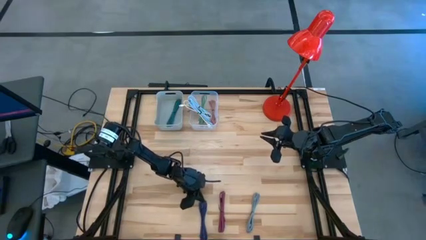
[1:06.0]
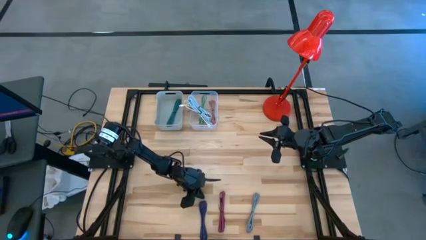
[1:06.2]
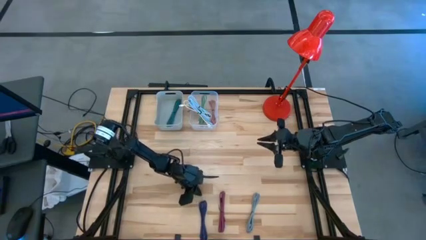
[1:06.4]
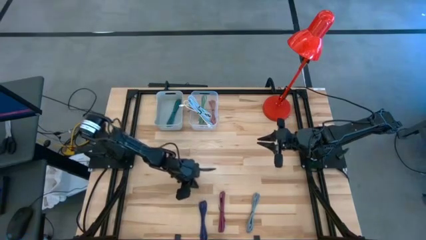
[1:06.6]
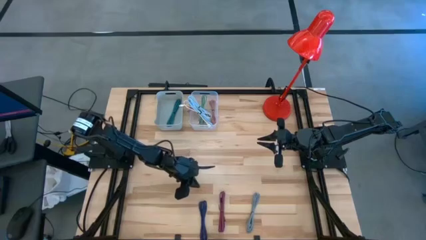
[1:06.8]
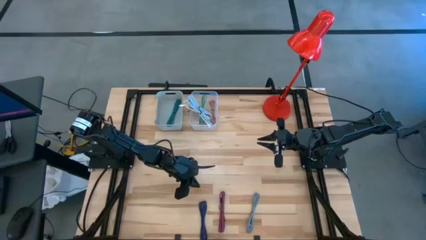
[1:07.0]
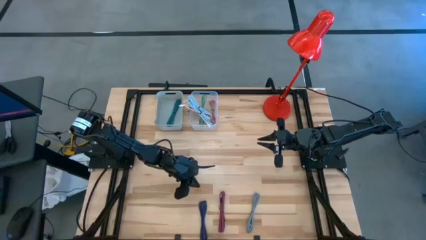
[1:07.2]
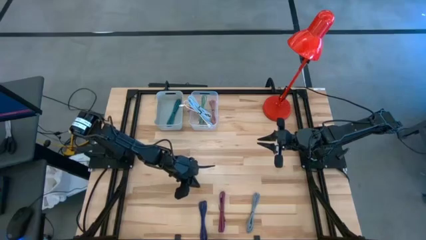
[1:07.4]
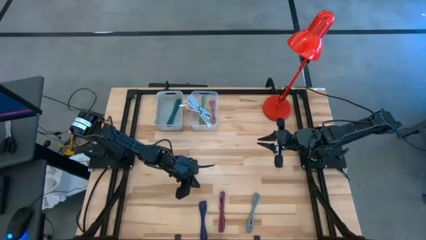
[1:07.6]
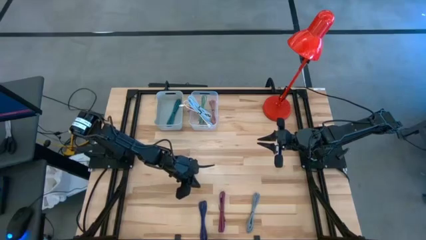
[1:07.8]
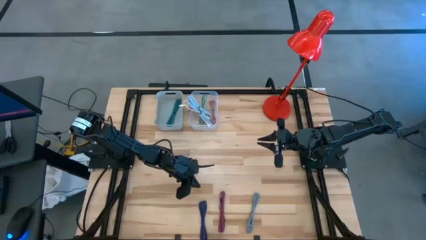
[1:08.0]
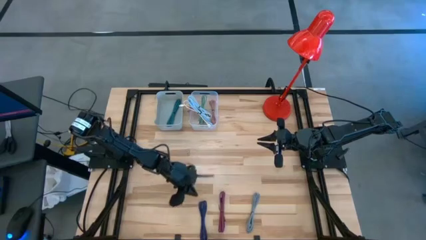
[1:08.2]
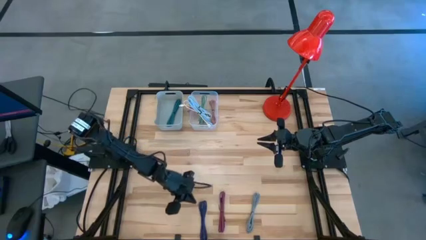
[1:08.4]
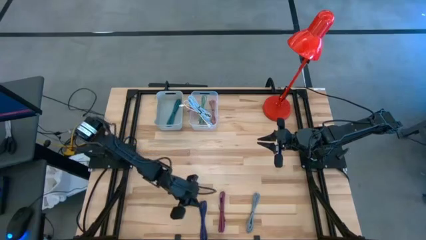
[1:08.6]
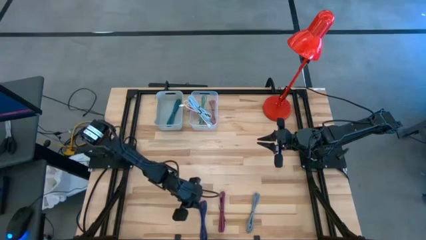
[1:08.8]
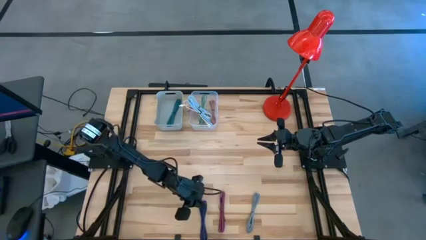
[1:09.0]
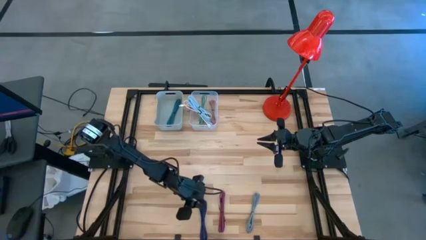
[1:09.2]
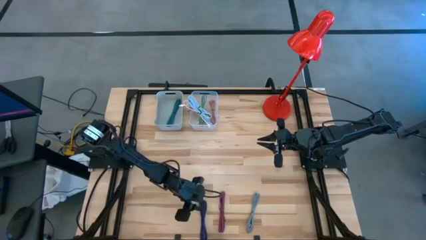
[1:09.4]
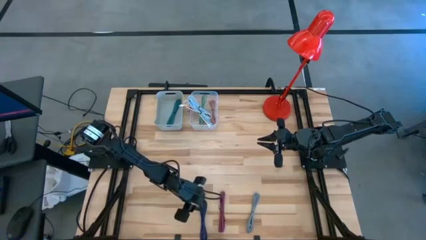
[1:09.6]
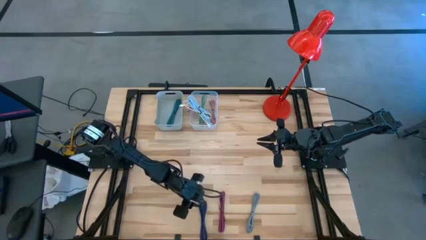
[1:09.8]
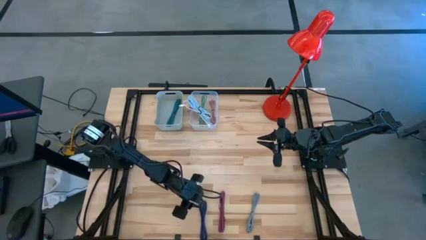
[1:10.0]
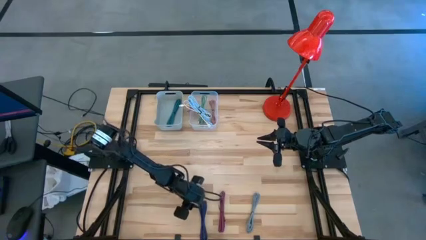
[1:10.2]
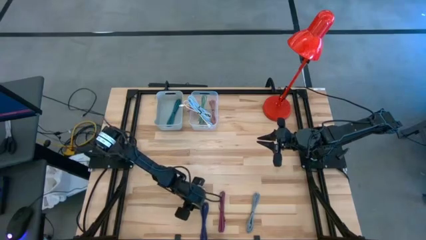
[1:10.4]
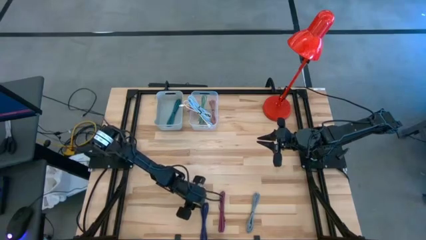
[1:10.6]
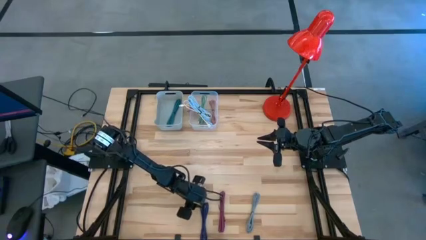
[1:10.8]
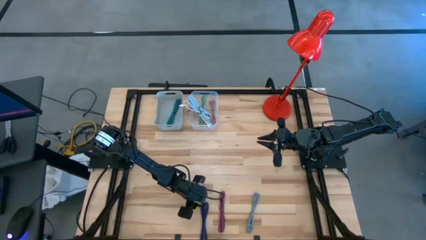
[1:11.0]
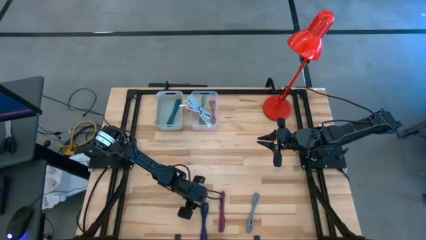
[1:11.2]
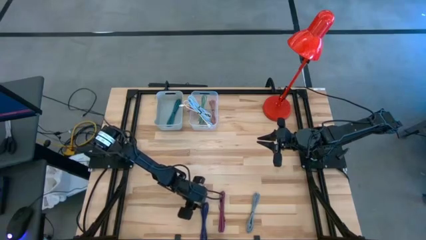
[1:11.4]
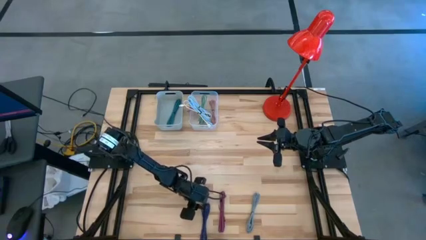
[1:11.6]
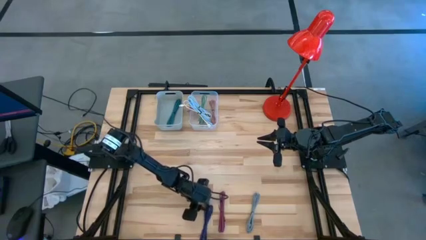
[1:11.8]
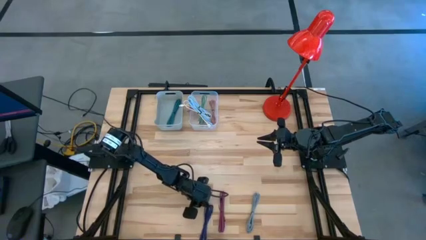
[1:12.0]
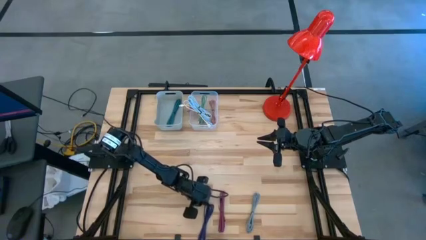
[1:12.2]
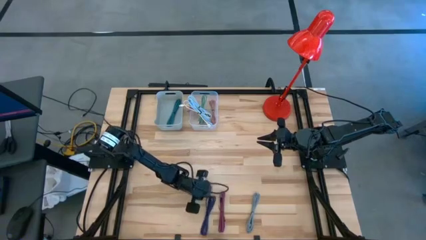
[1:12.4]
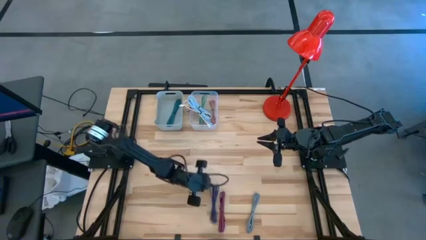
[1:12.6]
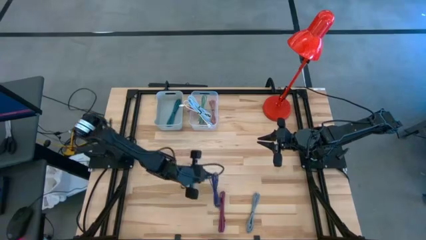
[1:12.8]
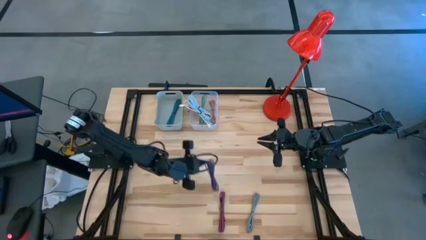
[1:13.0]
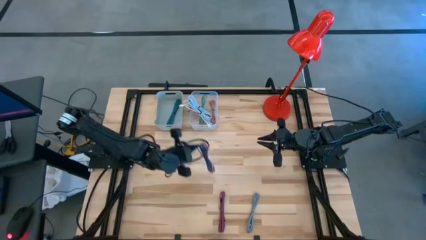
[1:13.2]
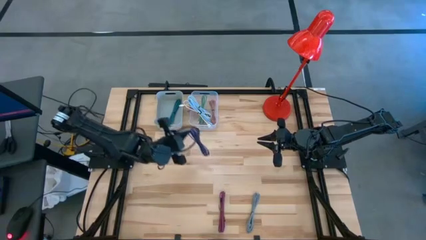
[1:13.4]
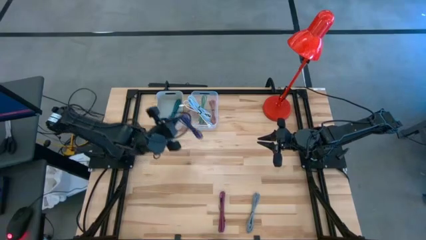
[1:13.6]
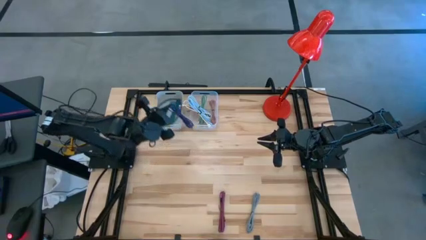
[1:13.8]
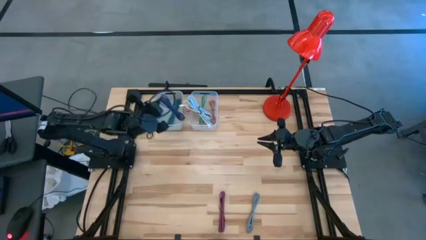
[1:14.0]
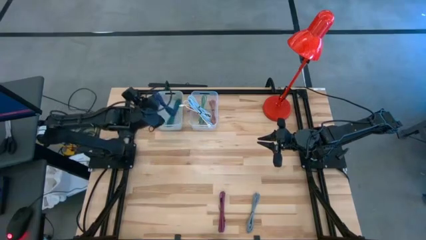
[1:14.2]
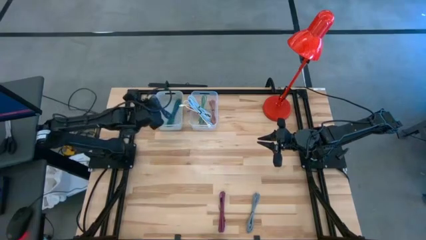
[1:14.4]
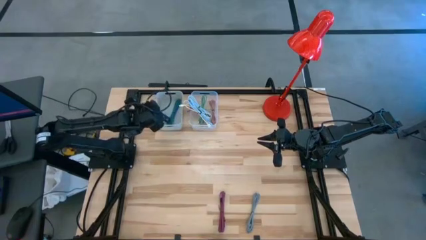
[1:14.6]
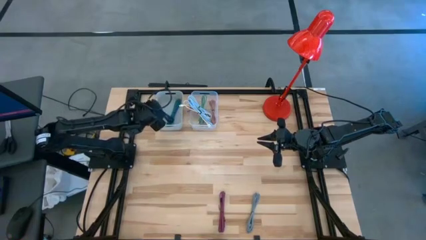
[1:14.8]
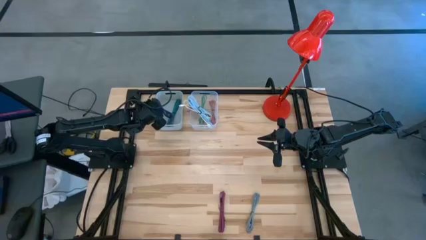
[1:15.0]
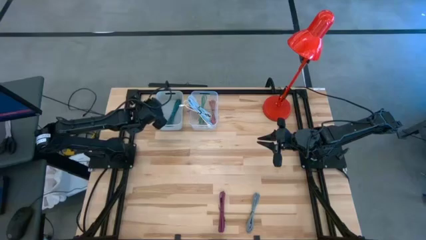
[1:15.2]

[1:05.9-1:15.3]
Task: Pick & Place USB Port
Put the black and violet charge cable into the gray bin

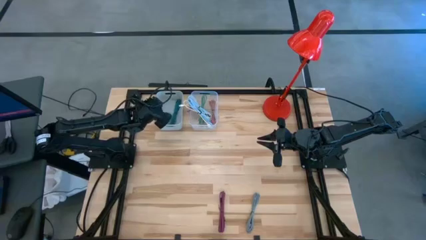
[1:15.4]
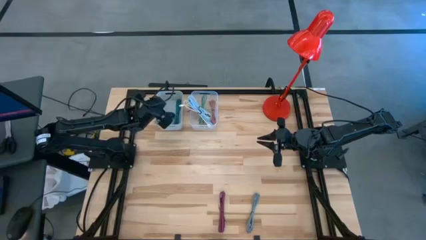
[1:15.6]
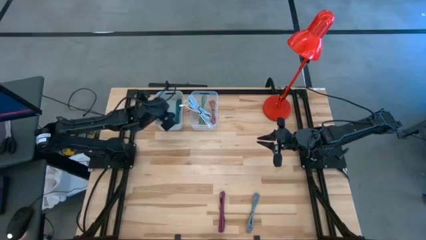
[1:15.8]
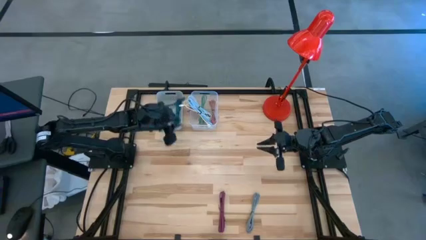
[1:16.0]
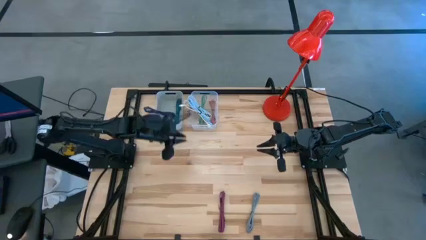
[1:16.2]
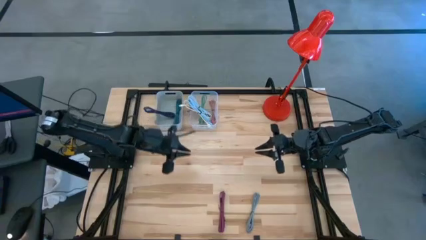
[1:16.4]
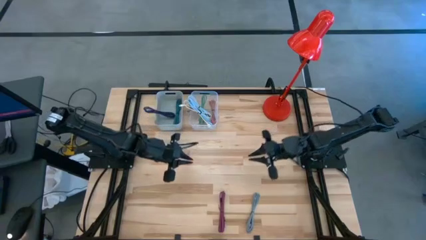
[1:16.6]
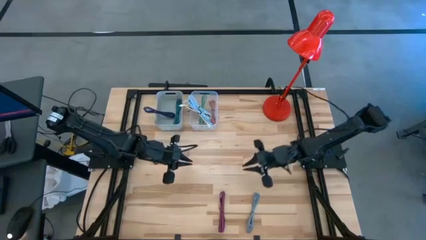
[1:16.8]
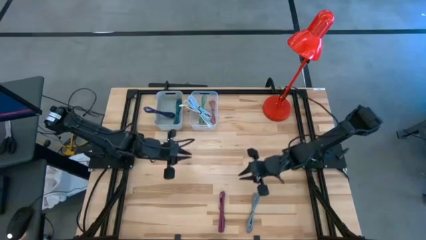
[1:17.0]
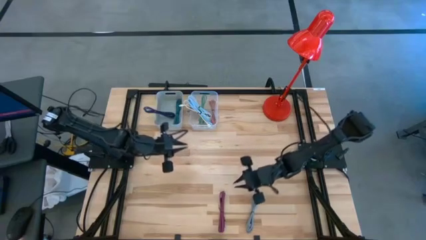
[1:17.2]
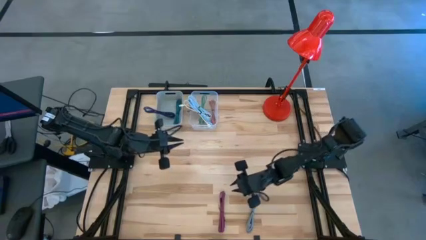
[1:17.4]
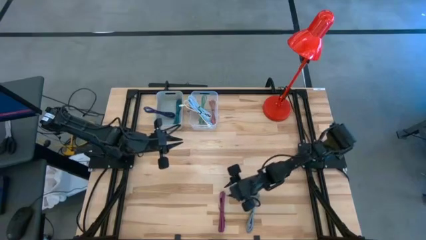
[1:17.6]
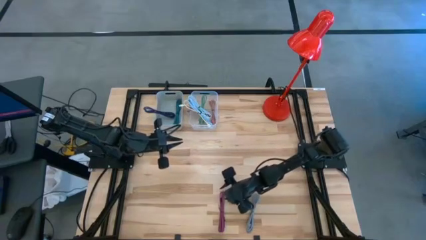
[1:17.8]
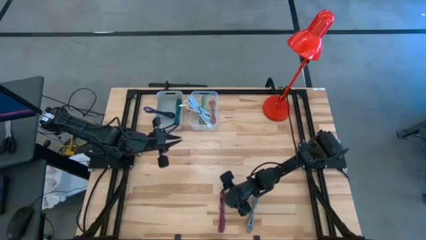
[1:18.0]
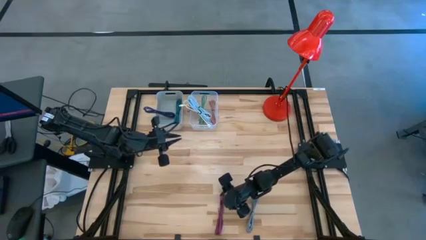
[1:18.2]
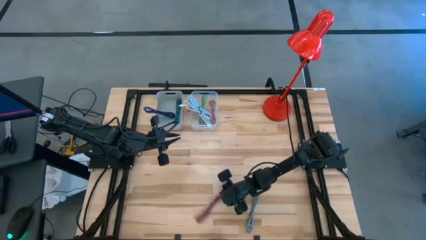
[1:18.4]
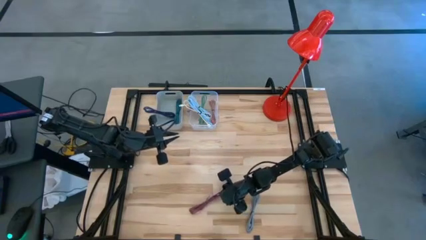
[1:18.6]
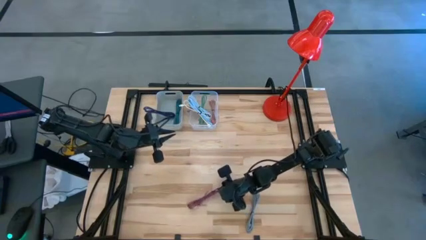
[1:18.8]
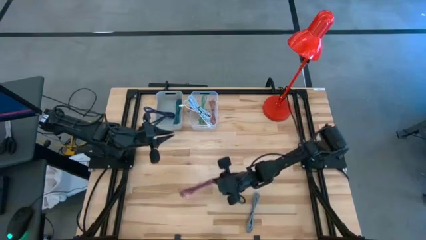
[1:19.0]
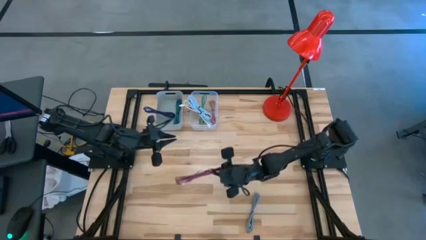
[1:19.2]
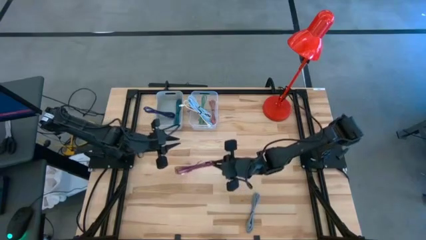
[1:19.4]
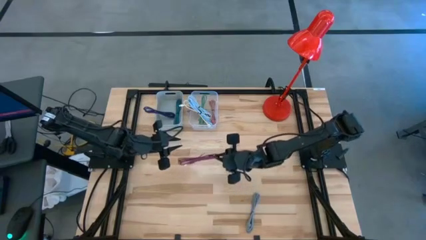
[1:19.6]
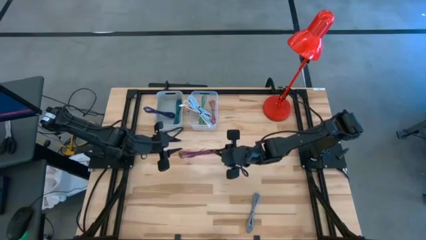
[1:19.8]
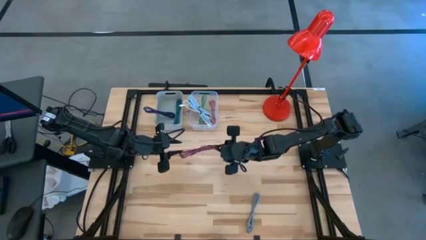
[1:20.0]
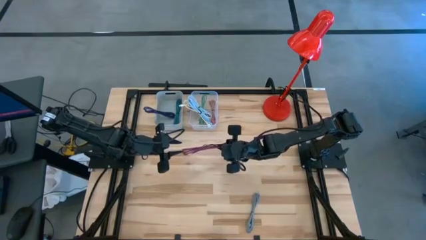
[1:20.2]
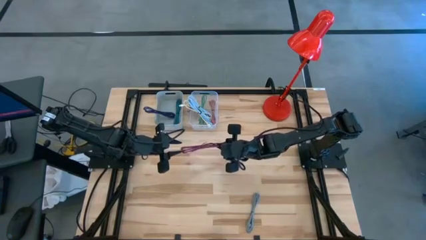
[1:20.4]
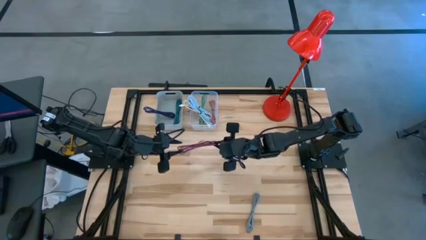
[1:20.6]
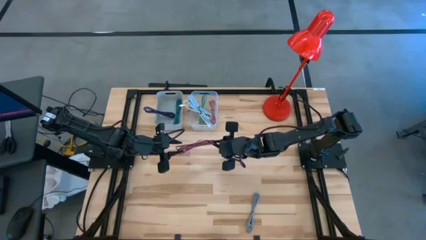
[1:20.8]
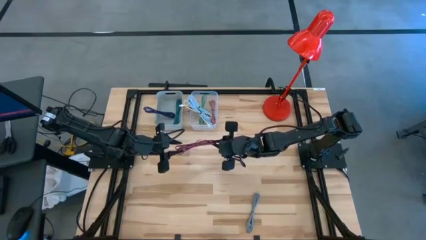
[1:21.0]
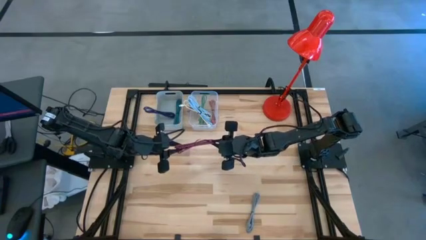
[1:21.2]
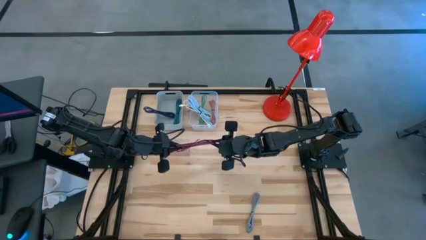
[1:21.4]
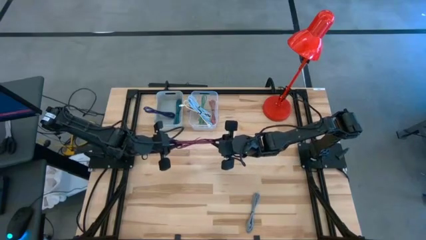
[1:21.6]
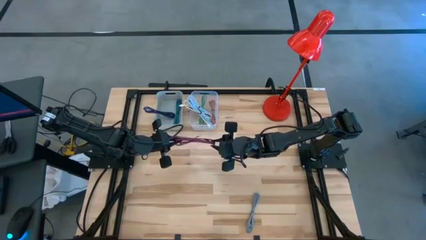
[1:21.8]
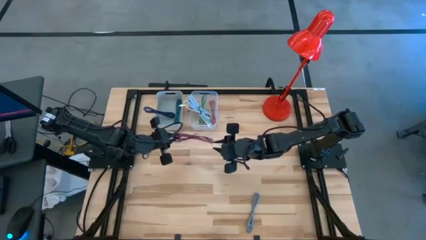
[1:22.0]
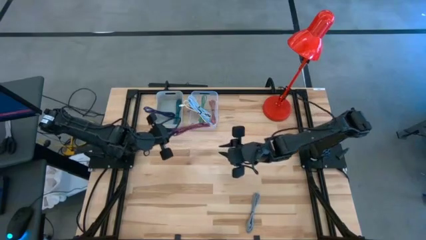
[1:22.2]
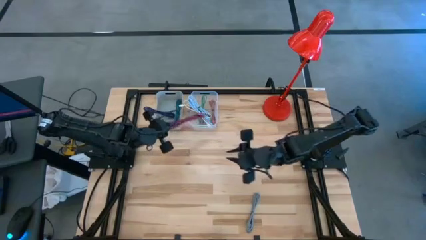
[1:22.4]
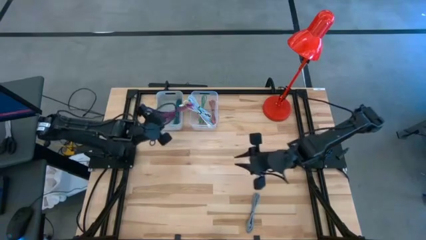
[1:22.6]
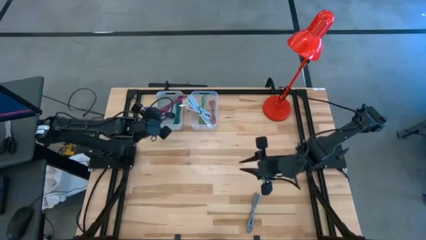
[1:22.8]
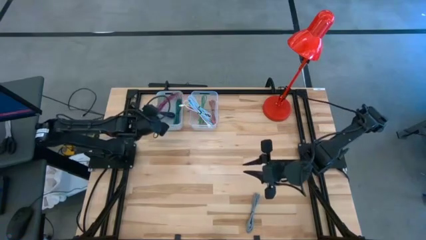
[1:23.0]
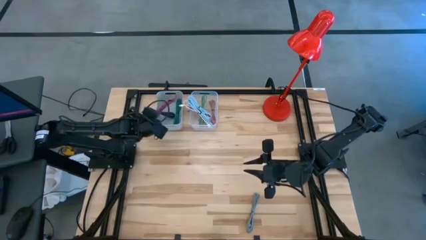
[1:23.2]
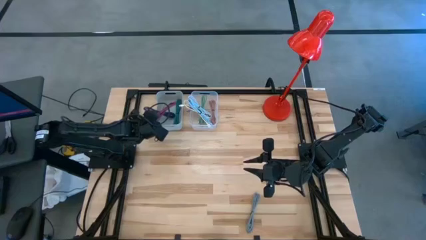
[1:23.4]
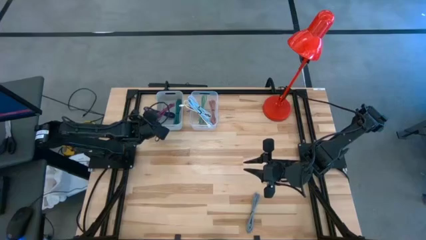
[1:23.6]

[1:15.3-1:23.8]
Put the black and pink charge cable into the gray bin
